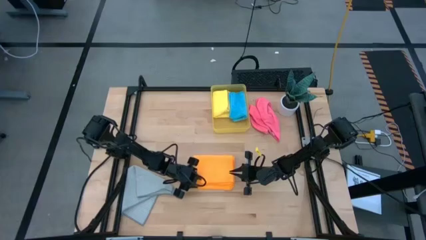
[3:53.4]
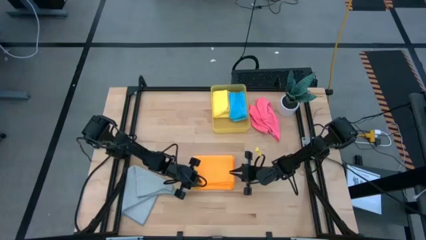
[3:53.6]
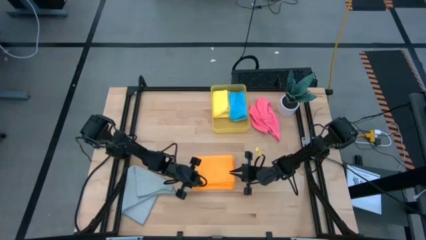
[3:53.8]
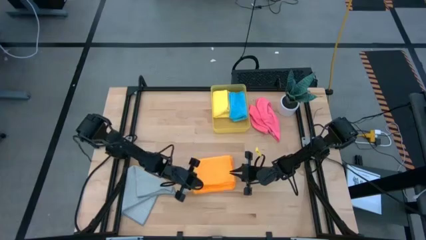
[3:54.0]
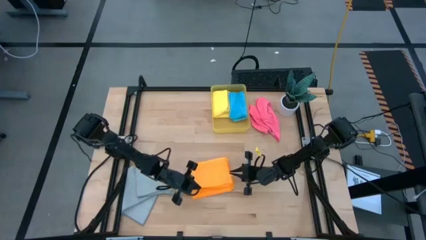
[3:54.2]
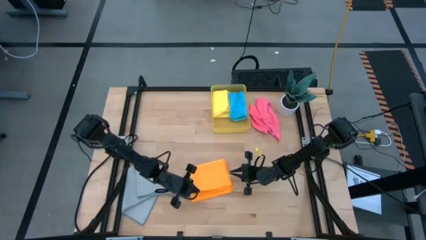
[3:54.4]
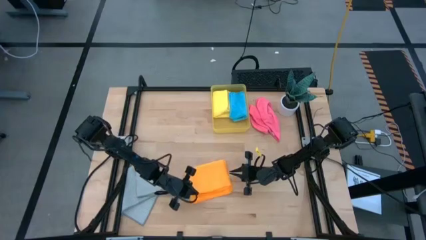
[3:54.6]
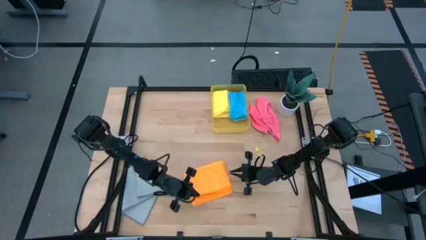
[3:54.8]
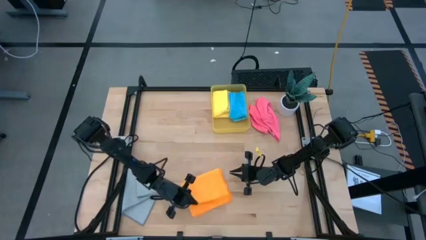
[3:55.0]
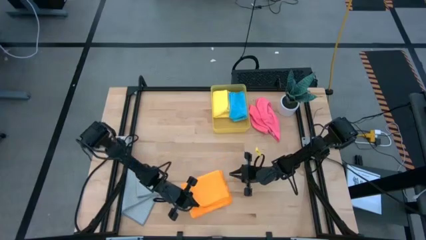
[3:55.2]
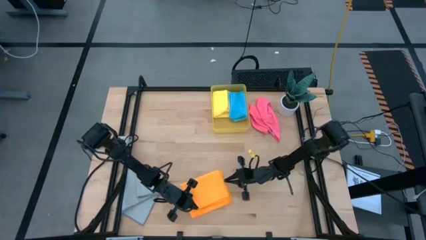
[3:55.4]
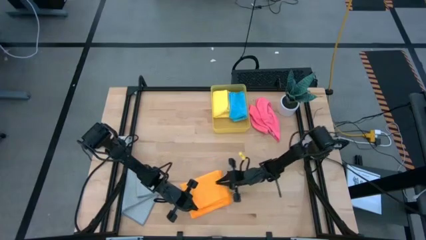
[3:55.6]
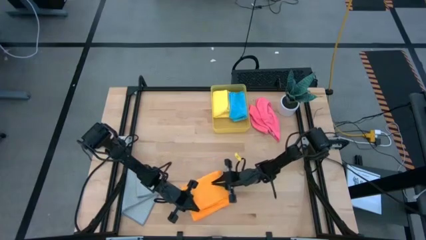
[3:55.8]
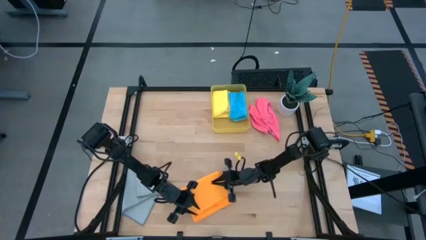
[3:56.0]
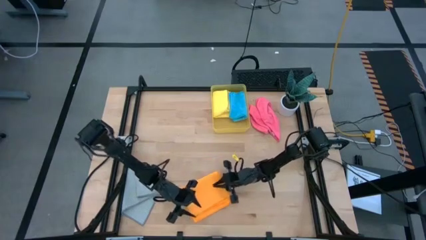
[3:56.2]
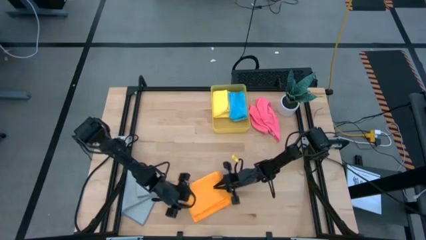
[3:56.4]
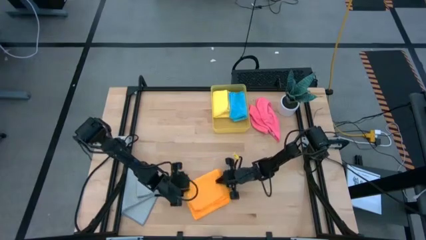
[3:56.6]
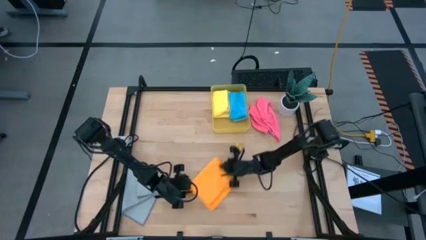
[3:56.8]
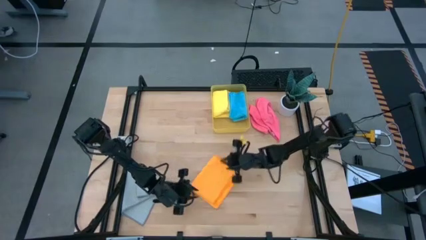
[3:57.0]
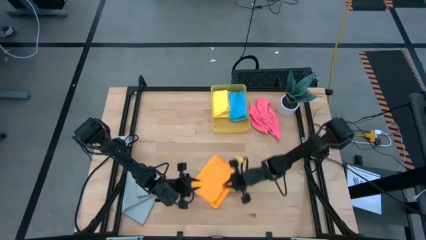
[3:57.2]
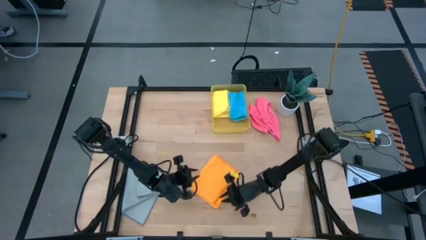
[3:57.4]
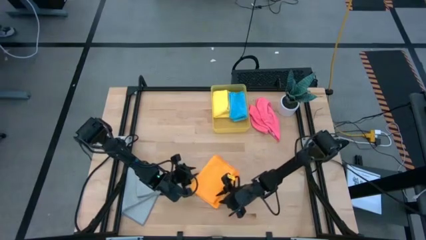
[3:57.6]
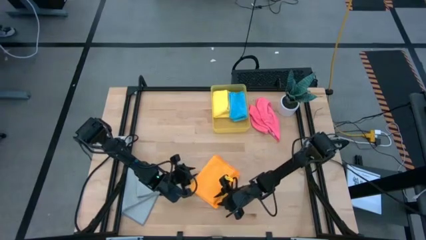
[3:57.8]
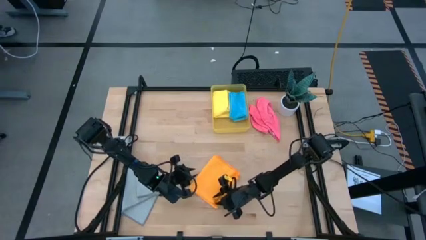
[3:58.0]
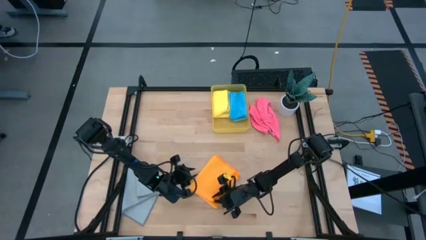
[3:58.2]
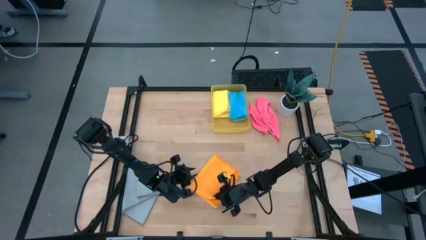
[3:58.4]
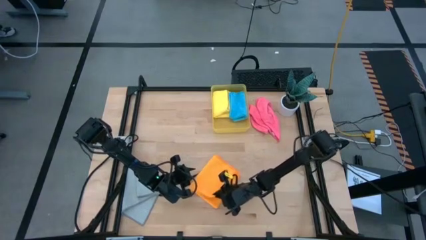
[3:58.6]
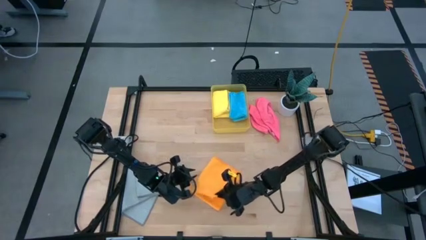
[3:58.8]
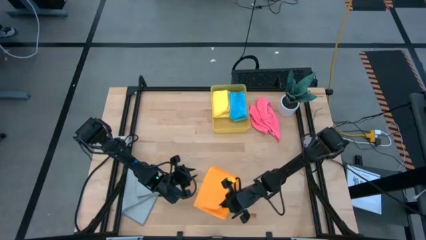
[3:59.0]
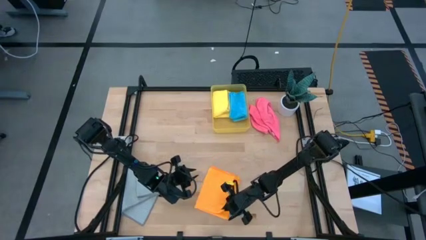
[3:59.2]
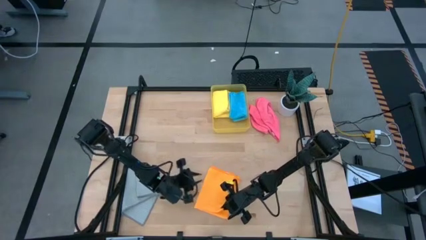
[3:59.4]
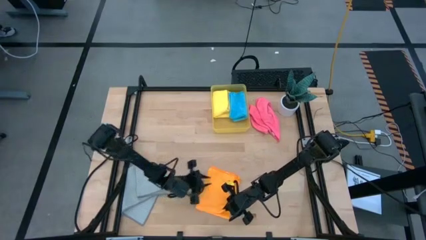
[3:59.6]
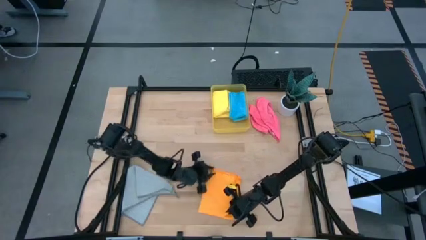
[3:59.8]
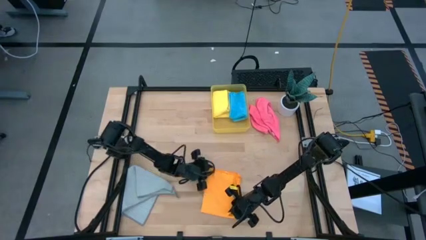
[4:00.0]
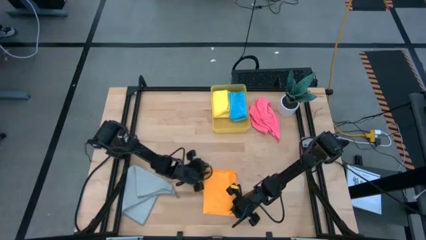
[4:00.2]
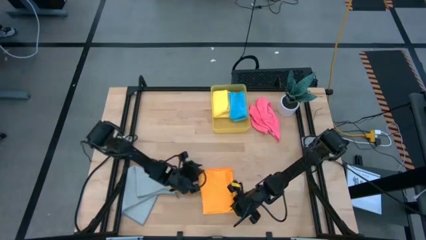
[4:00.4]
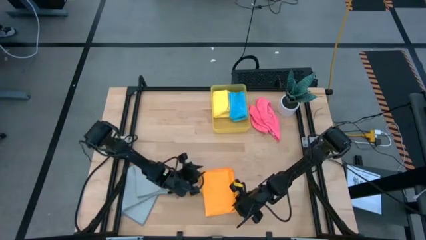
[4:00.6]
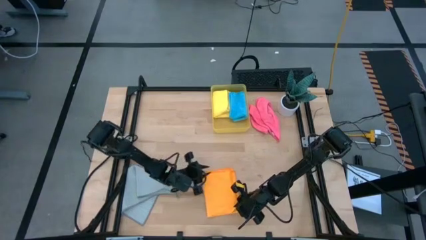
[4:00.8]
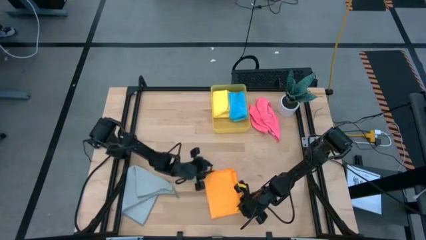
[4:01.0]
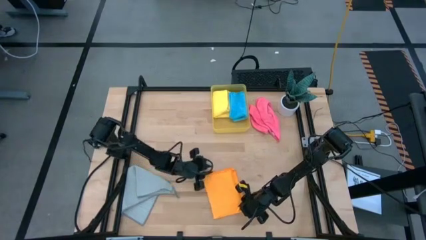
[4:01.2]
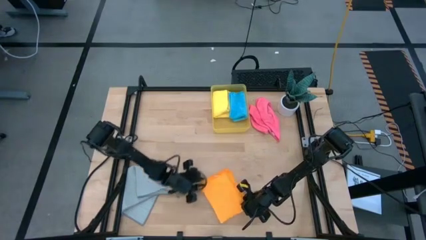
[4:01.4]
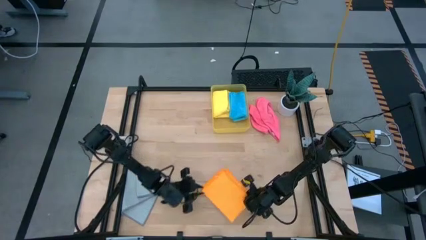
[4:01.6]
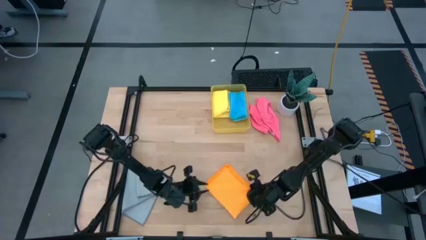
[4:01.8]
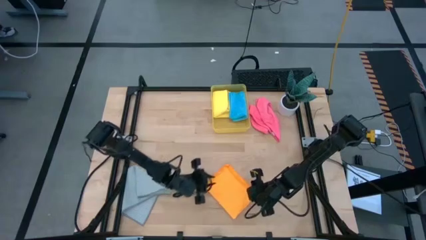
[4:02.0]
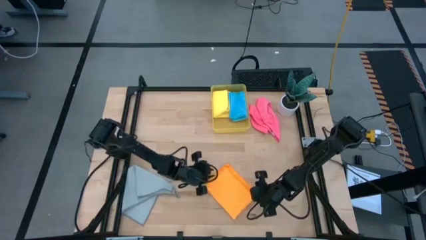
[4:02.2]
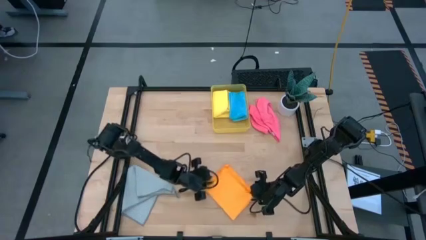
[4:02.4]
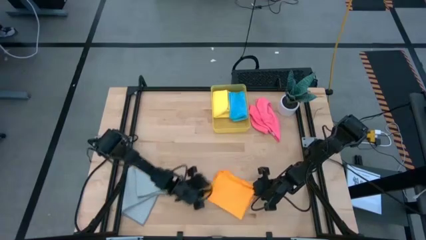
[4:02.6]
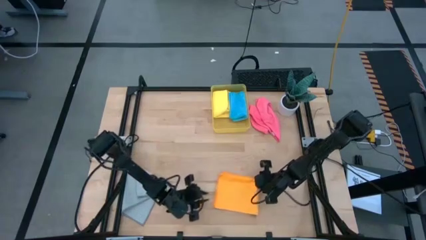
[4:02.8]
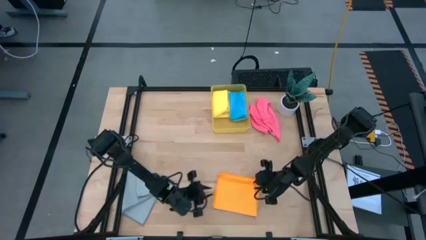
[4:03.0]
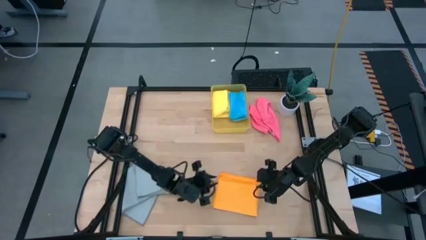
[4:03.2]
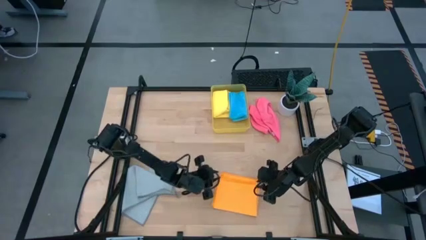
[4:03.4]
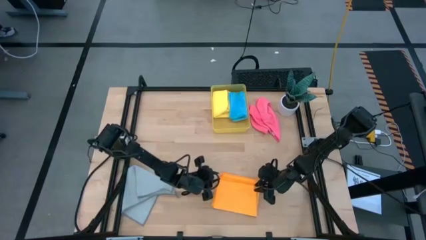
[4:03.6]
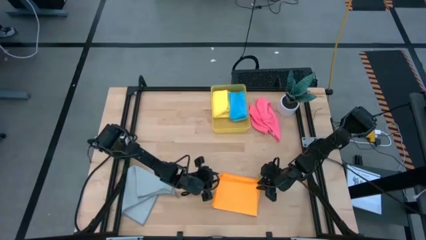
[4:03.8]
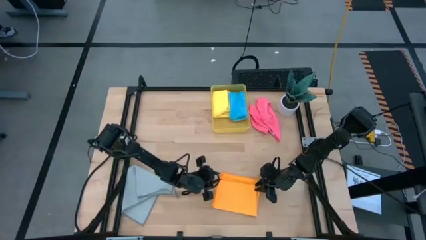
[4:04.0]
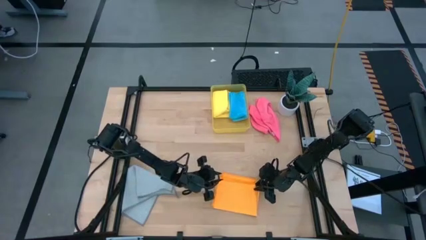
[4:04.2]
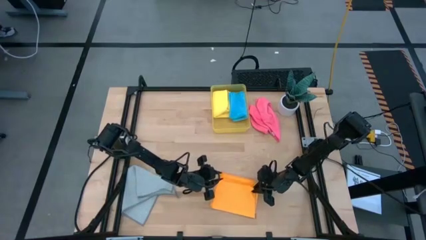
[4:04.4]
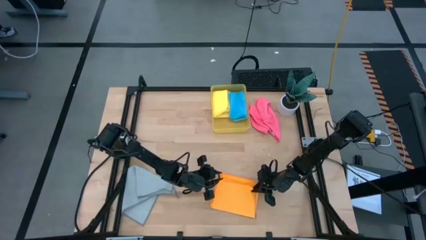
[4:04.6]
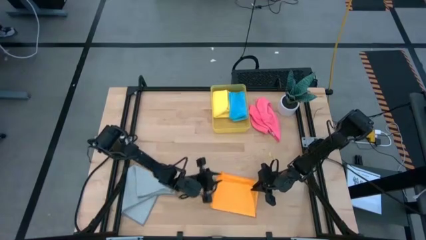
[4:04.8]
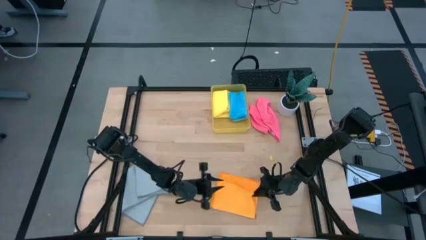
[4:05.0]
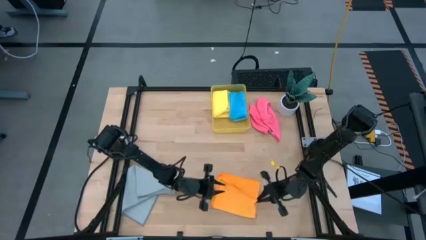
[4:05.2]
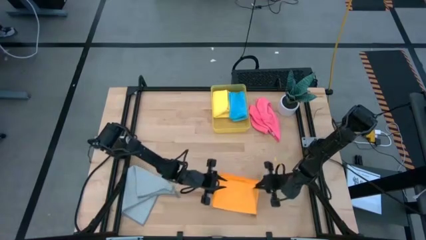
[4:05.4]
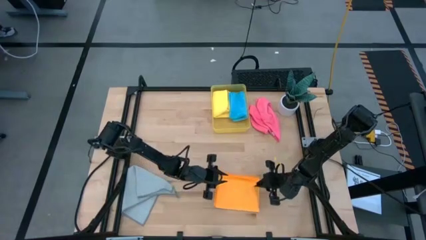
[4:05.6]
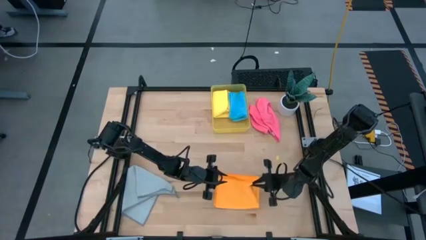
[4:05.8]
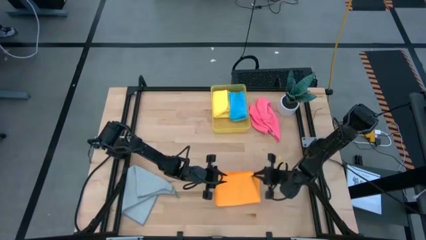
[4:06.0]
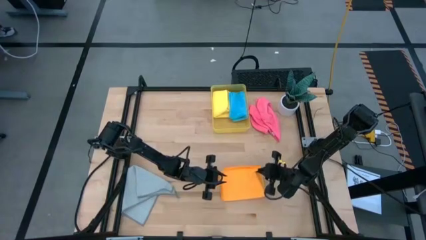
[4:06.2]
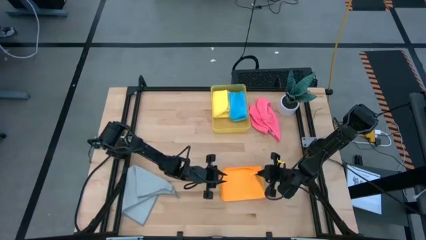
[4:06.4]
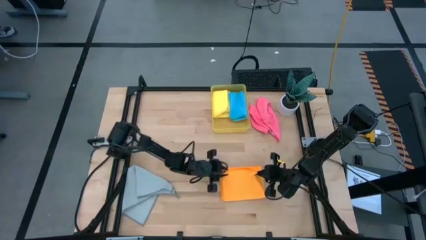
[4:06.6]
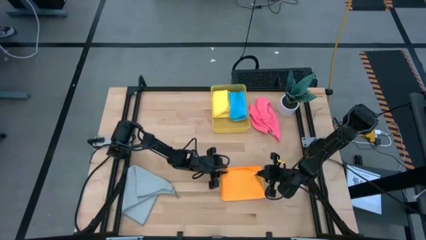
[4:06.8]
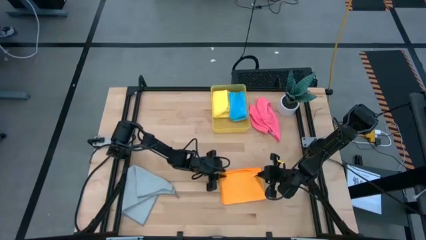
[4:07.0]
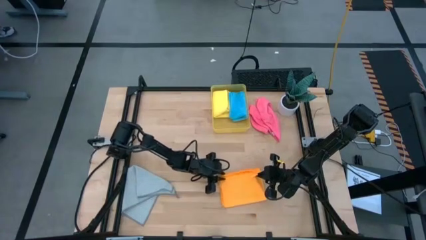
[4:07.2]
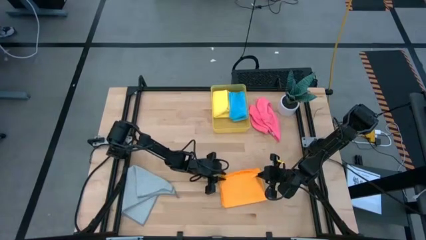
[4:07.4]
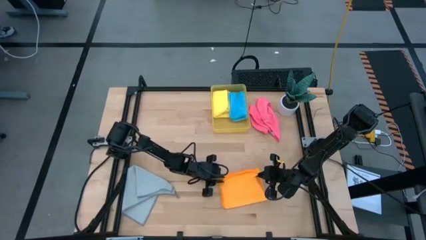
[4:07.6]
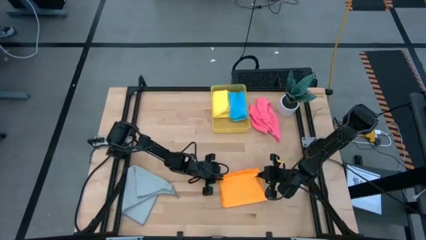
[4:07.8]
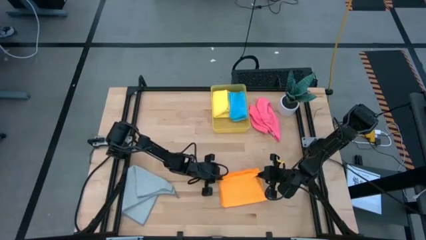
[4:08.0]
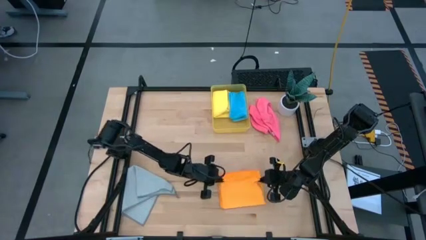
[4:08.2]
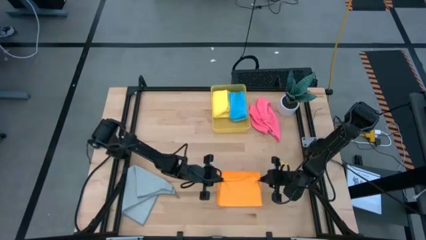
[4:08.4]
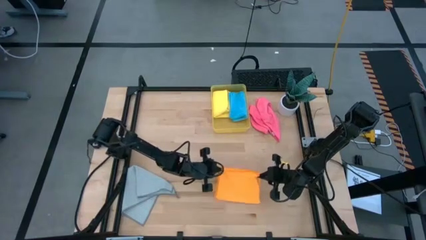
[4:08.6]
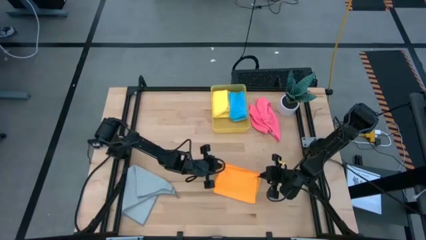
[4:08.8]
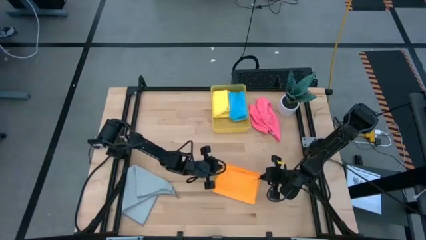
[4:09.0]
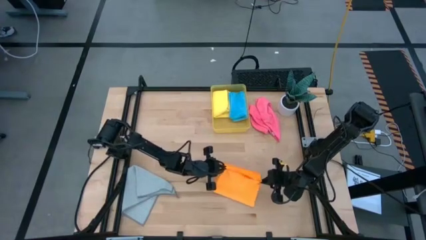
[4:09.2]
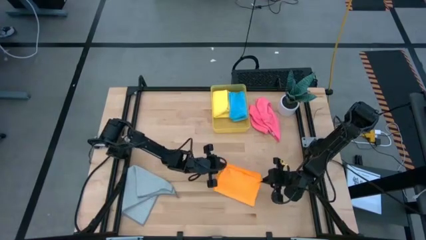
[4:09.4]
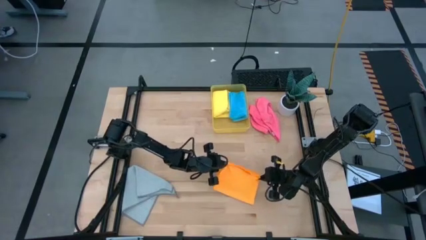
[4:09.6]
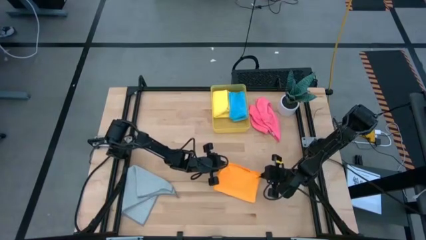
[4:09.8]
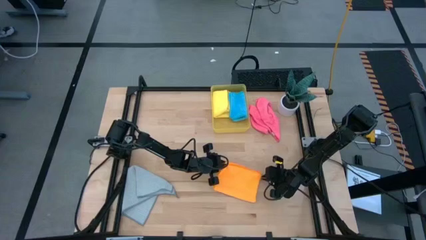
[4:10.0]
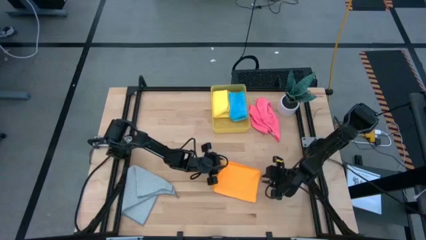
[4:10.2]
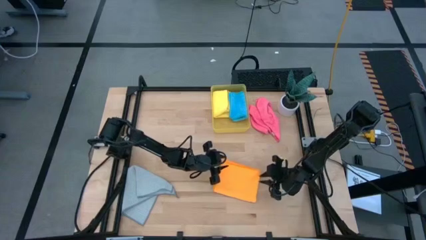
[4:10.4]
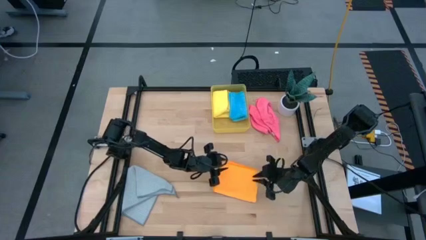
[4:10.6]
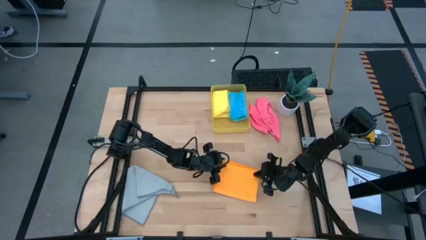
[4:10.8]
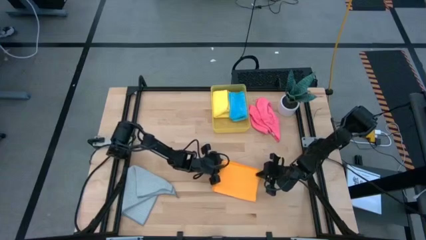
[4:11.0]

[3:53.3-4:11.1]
Task: Fold microfiber towels
Fold the orange microfiber towel
